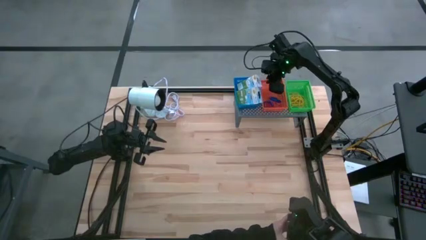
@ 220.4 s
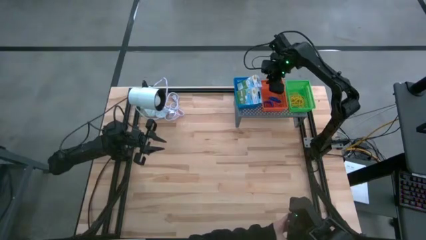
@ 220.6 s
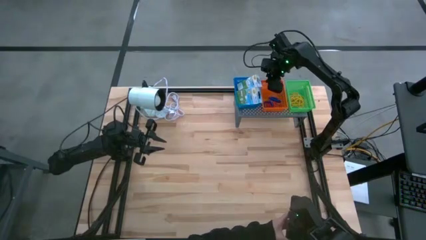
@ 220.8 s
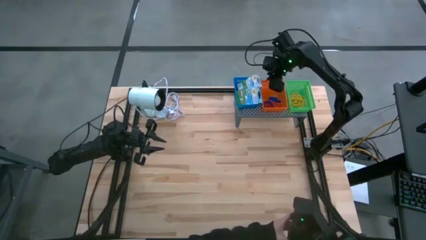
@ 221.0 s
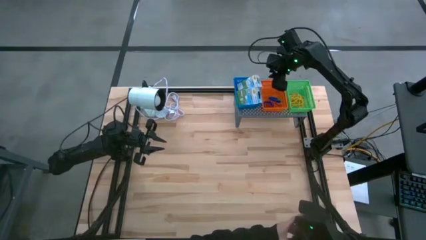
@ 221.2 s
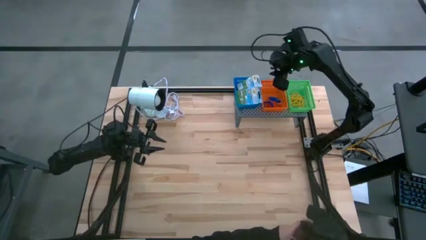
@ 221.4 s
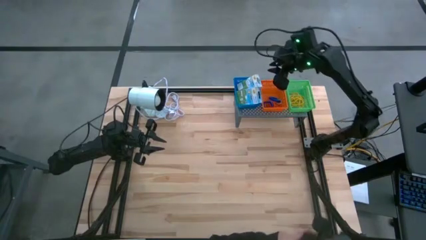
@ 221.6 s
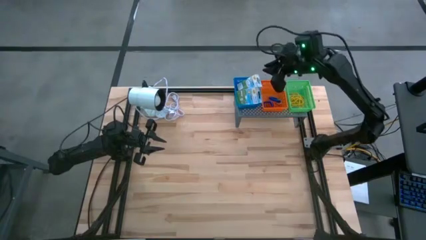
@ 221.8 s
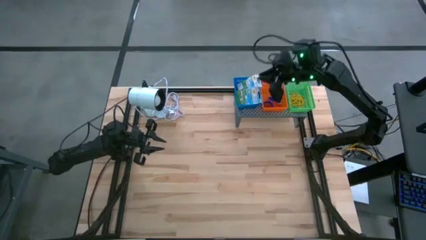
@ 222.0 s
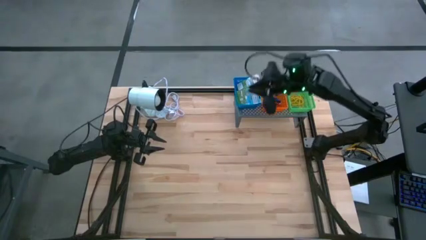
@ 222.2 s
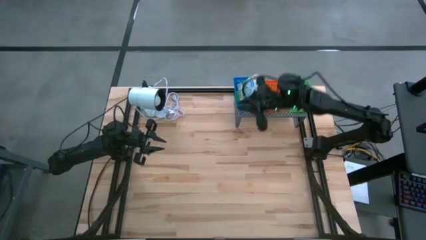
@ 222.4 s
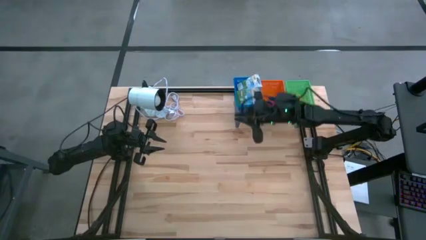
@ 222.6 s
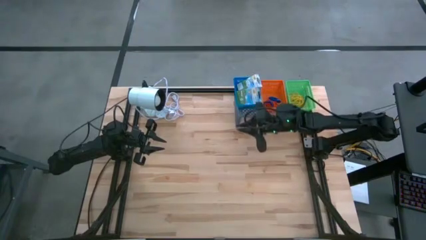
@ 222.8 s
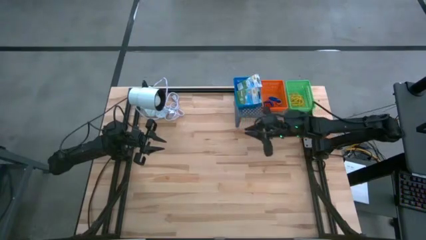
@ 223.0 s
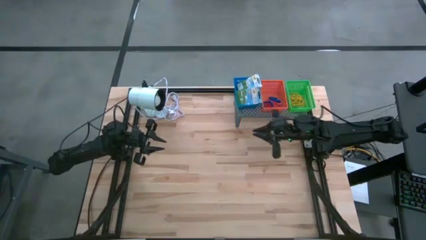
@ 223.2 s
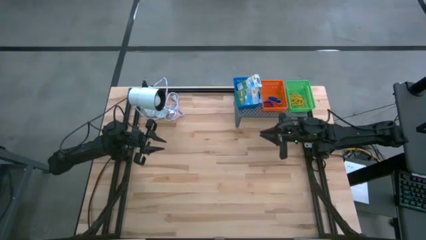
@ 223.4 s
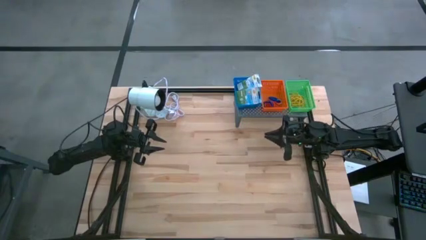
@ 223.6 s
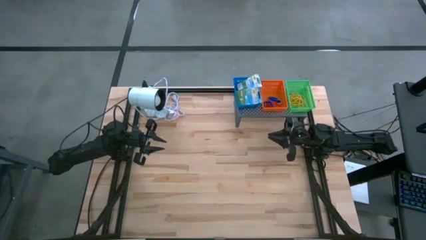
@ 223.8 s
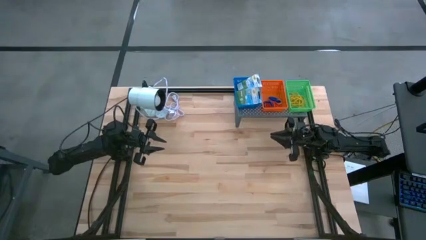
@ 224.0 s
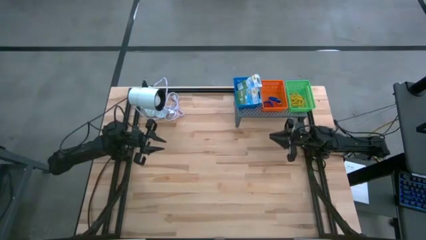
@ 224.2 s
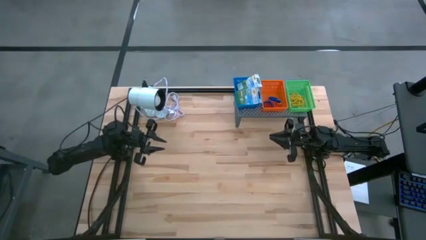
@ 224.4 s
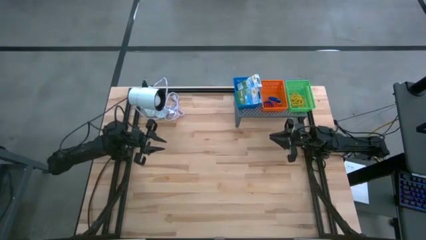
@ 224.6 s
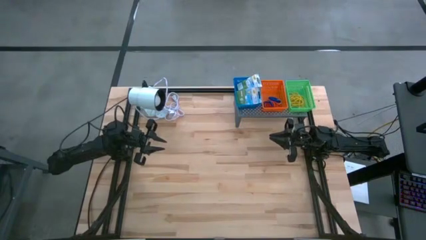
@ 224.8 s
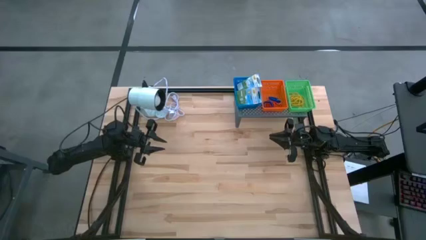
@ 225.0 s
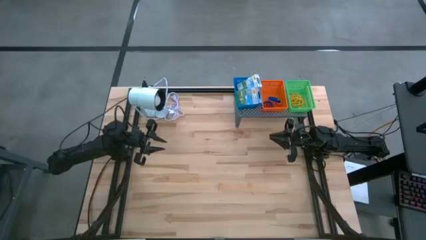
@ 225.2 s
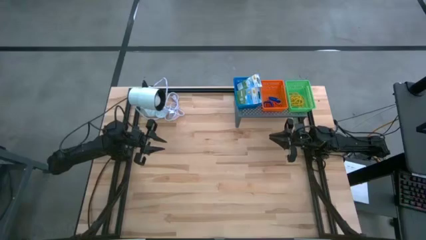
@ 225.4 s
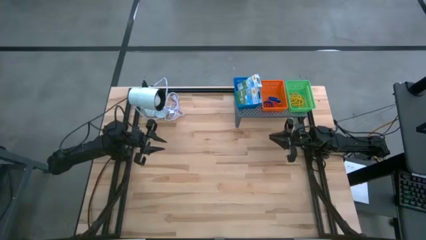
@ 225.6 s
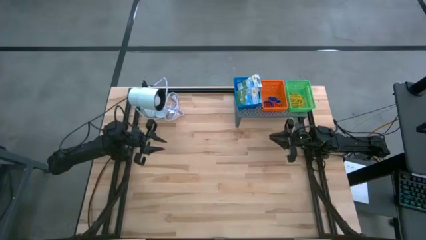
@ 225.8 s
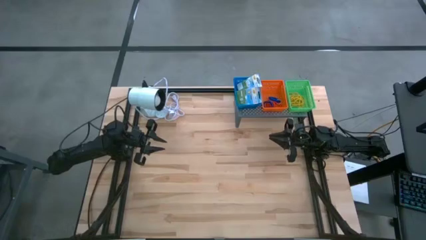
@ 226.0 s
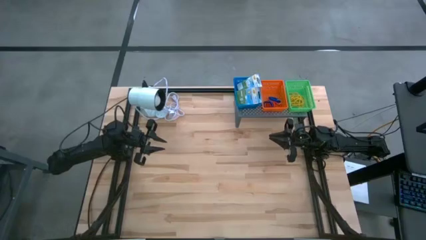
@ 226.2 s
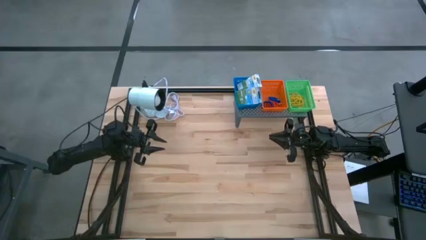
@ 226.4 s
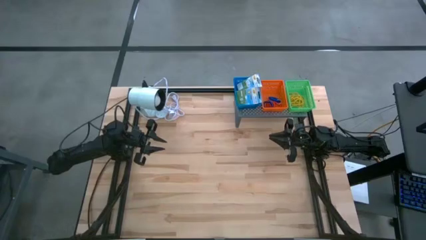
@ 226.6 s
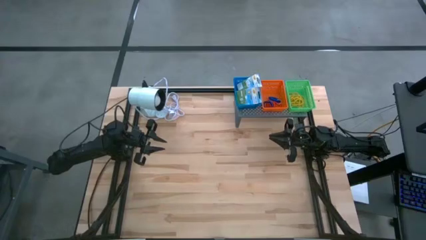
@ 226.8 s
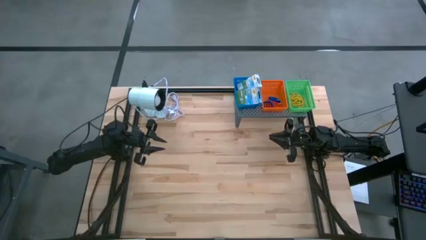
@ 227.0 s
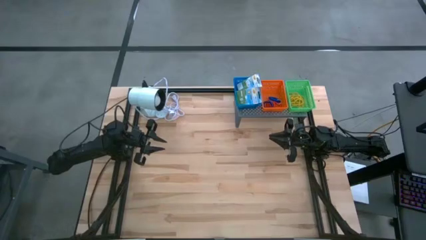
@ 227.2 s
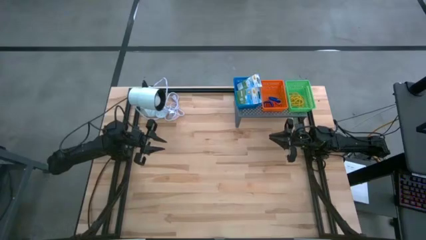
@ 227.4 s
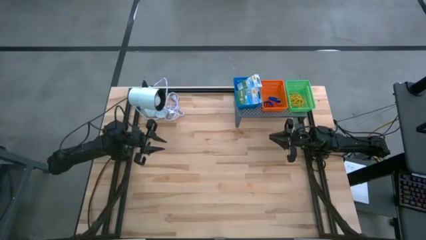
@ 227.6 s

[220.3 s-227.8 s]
Task: Pick & Place Office Desk Supplies
Return to Home Position

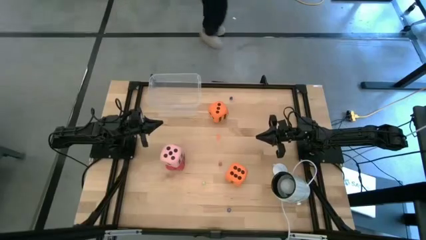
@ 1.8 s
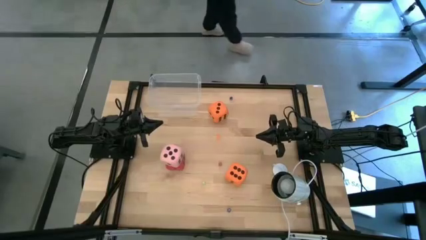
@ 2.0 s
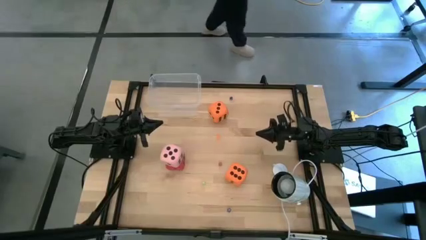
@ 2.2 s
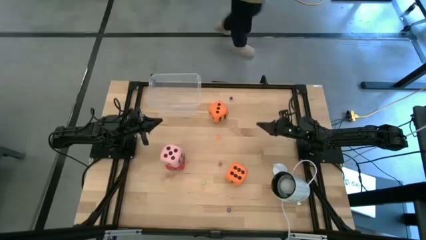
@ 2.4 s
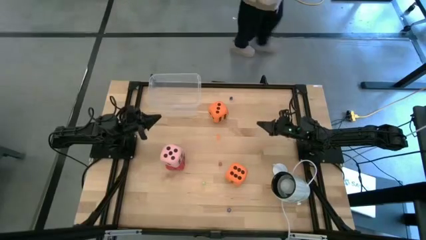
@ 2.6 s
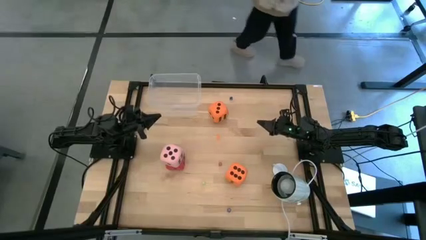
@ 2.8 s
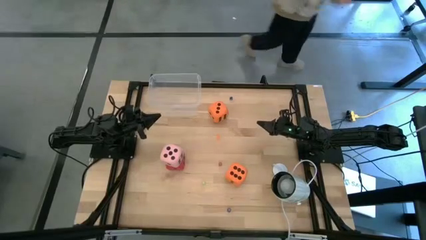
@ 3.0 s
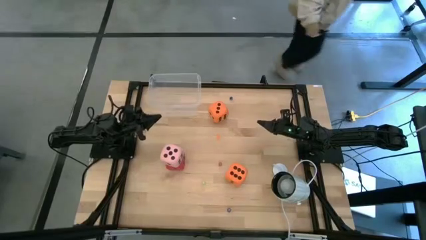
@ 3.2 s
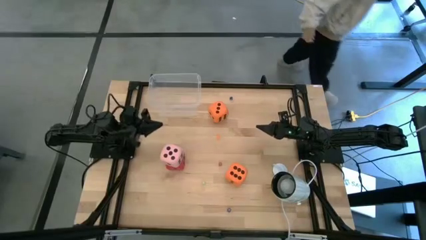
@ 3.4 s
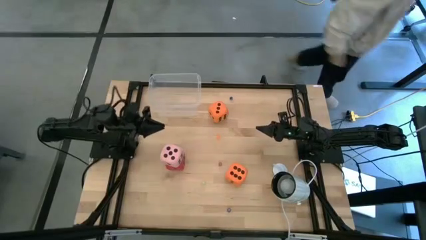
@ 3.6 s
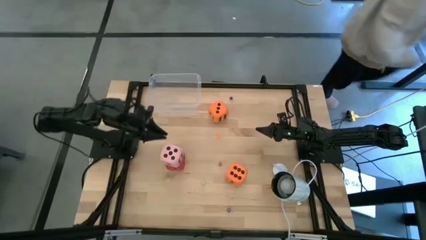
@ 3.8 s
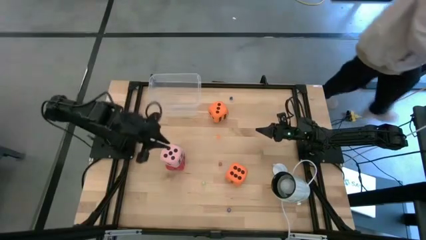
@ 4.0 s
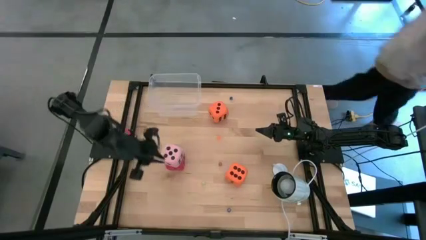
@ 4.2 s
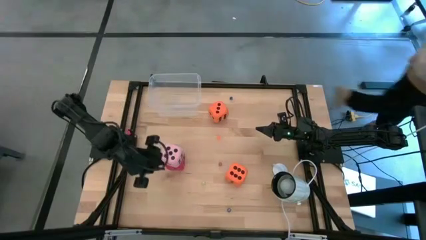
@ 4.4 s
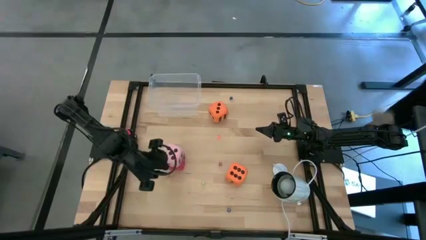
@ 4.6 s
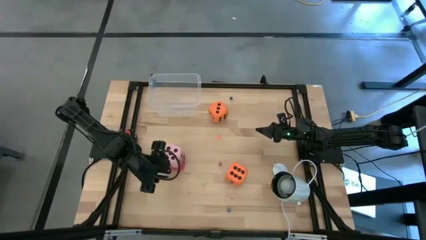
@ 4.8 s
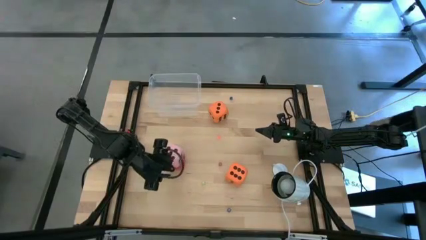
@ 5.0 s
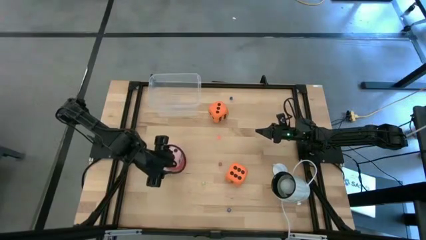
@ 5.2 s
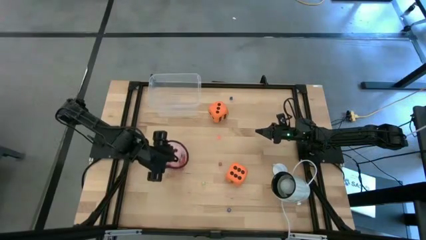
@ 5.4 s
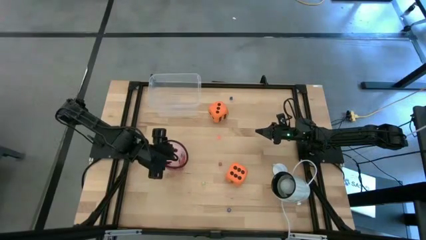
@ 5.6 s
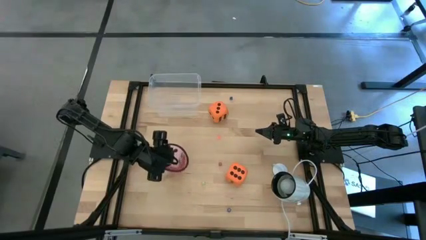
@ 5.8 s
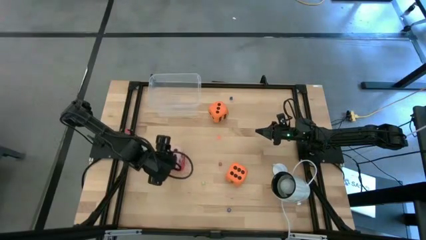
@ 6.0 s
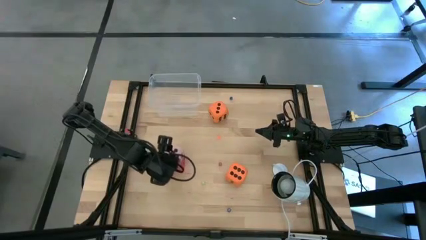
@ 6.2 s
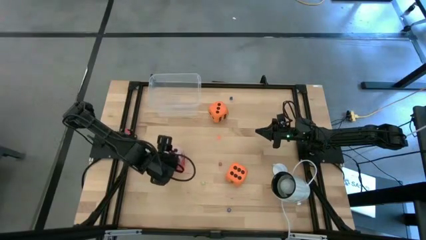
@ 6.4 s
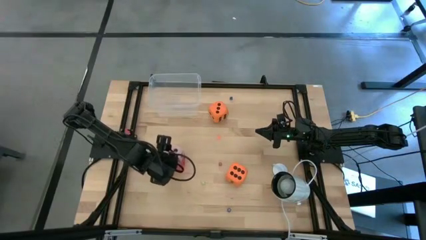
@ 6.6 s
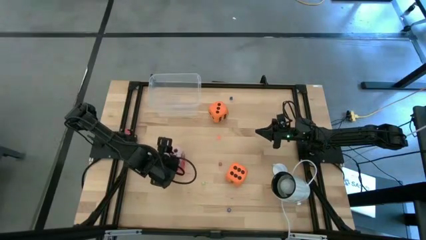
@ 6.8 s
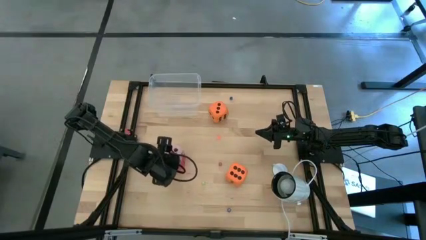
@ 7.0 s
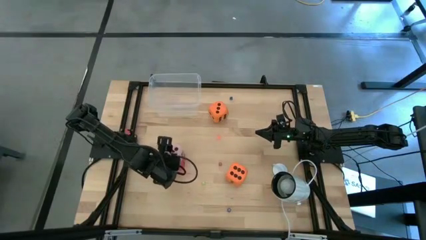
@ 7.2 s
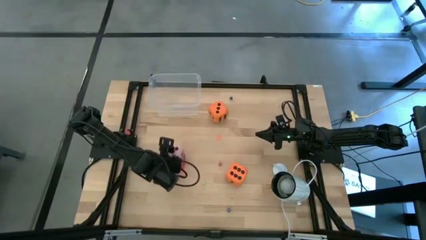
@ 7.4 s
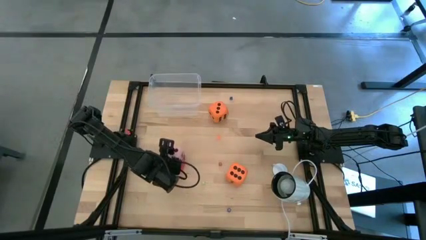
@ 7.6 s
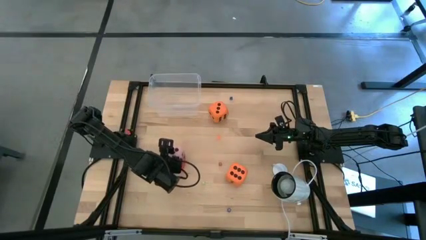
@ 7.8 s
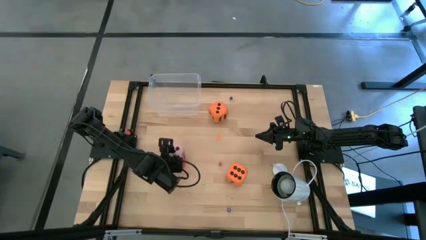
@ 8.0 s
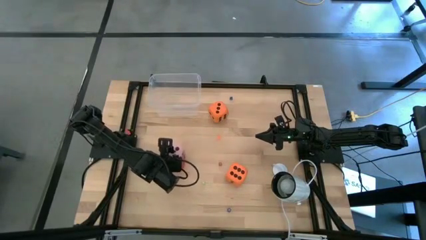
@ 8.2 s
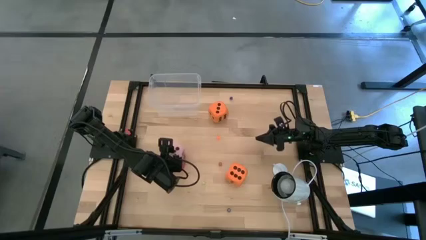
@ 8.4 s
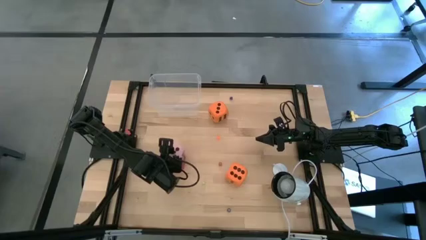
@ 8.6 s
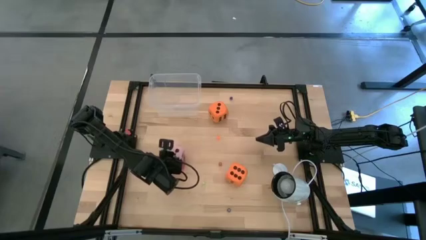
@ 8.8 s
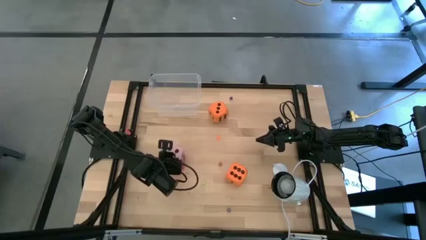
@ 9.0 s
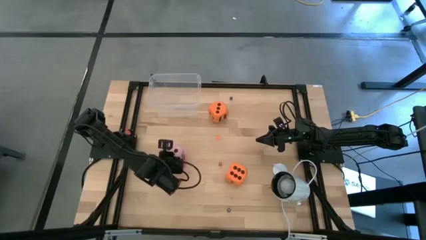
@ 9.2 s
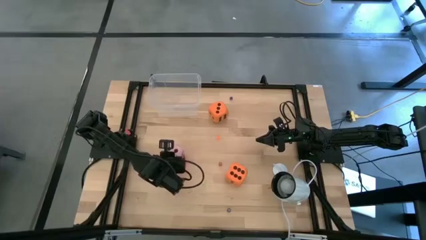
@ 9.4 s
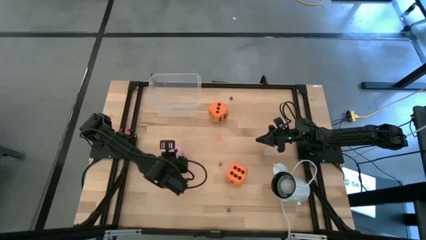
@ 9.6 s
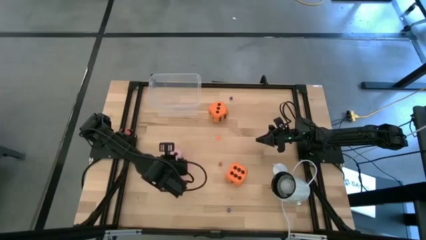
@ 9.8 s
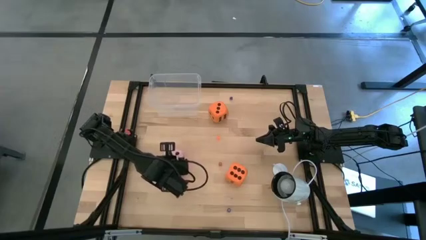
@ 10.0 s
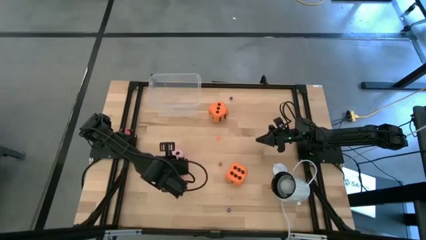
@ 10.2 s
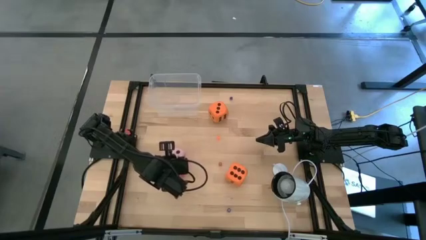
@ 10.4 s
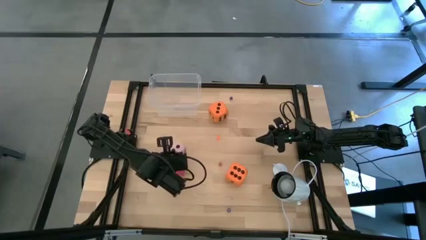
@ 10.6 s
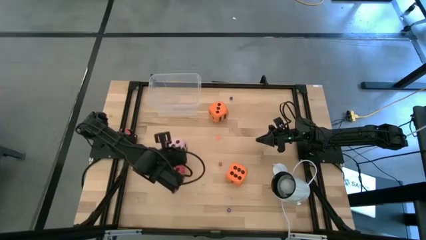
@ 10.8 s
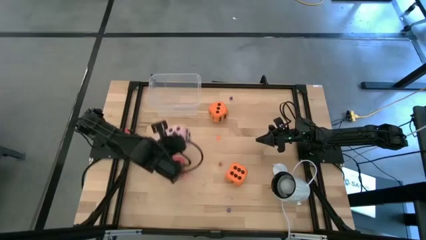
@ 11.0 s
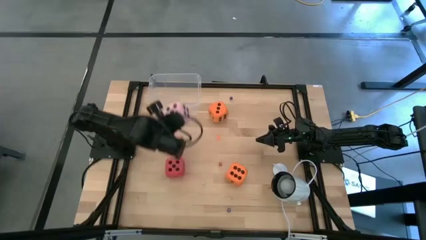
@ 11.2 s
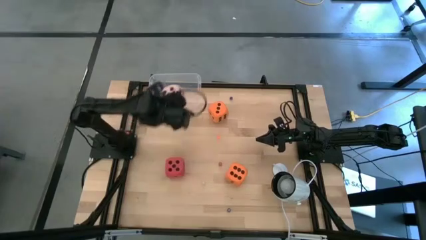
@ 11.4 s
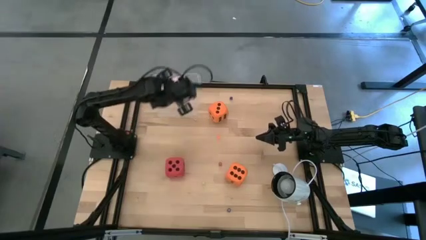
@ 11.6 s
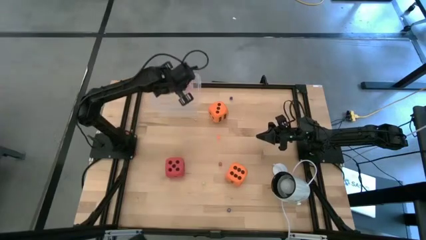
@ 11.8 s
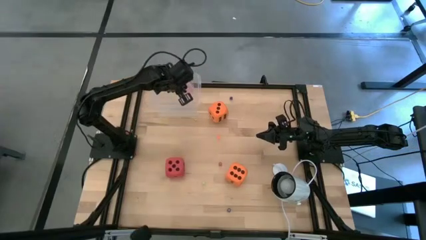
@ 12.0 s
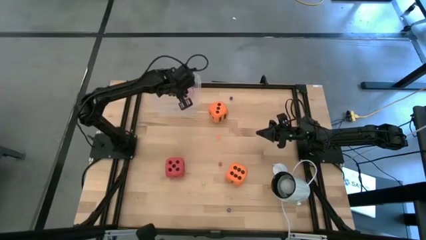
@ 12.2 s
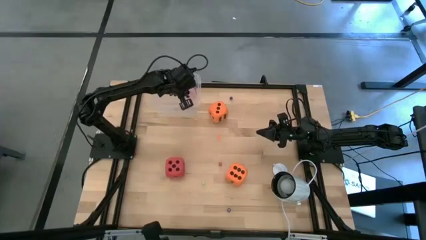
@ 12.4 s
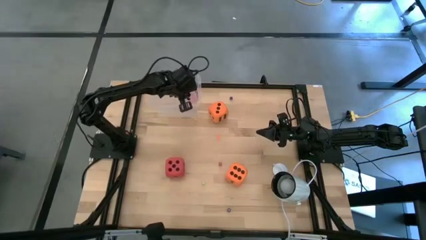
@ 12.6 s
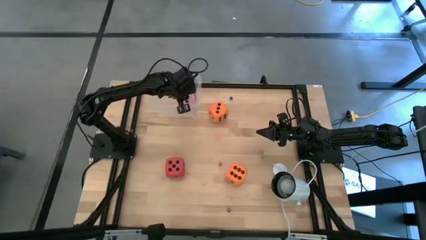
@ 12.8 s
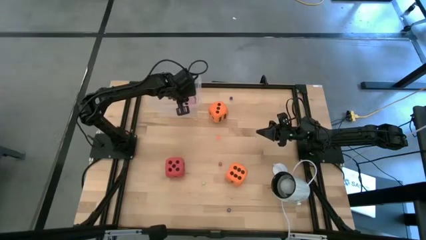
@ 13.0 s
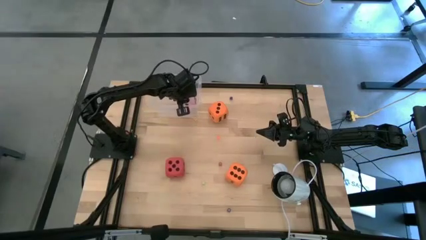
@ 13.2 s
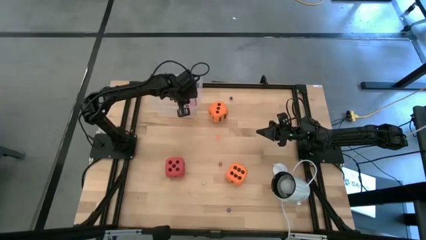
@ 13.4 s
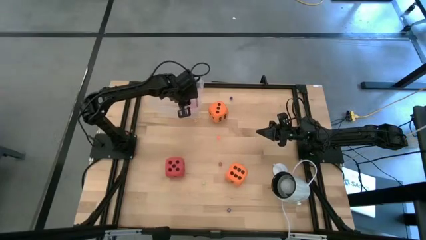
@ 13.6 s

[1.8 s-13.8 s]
Task: Pick & Place Dice
Put the large pink die into the transparent bin
